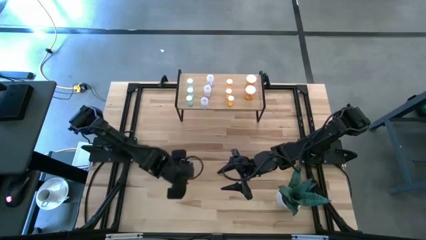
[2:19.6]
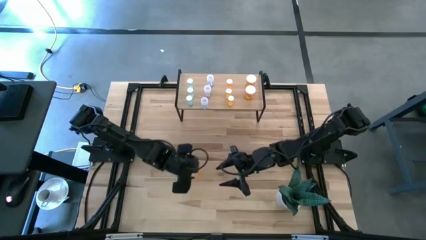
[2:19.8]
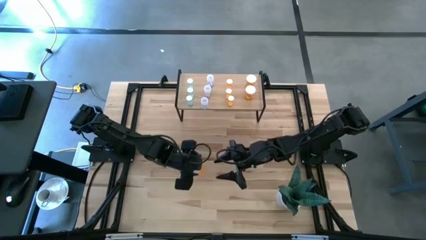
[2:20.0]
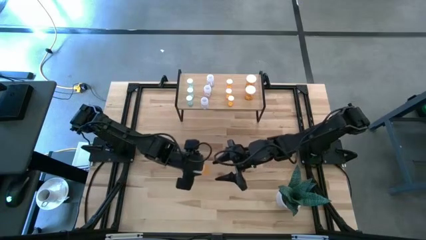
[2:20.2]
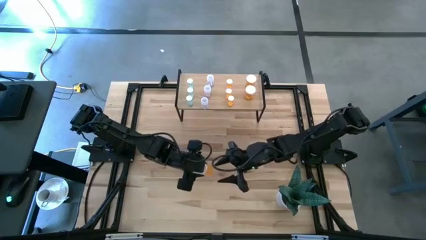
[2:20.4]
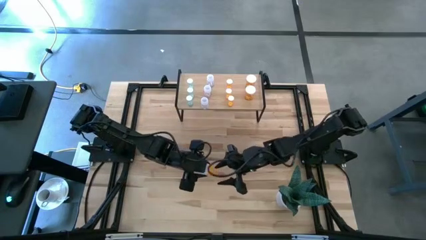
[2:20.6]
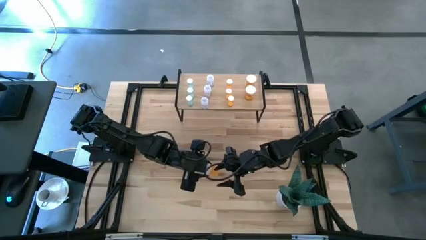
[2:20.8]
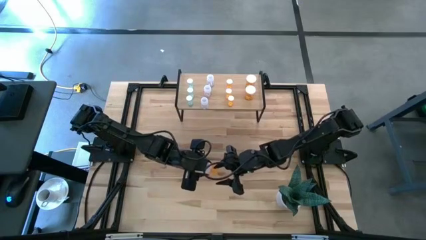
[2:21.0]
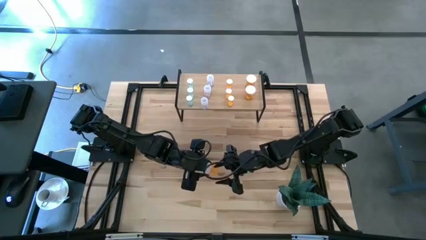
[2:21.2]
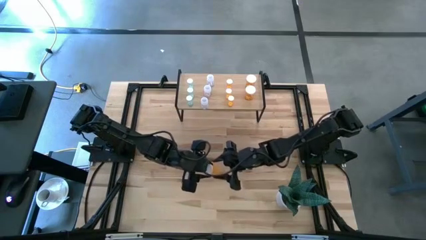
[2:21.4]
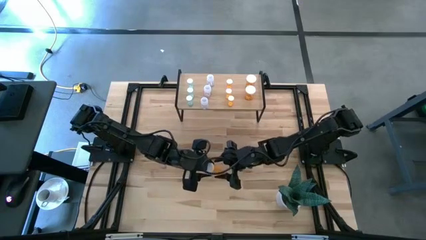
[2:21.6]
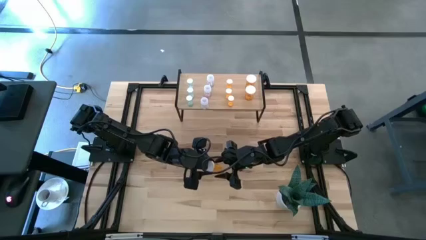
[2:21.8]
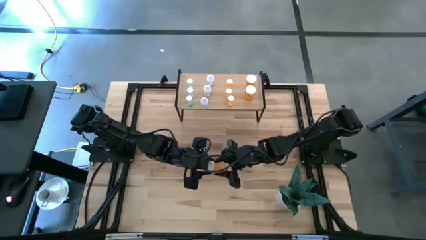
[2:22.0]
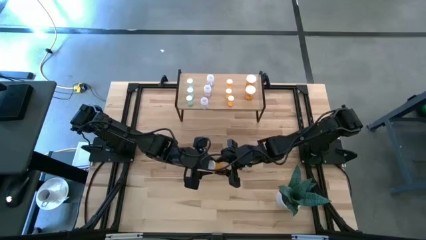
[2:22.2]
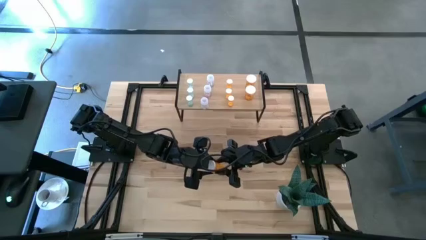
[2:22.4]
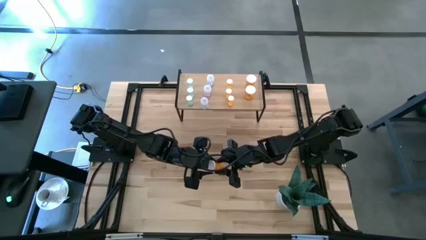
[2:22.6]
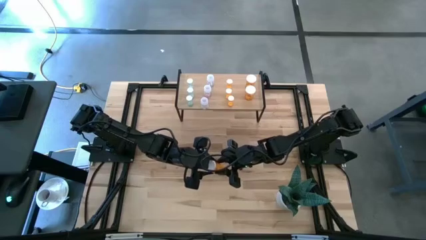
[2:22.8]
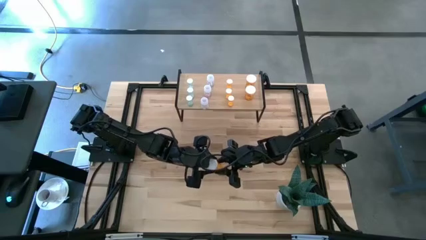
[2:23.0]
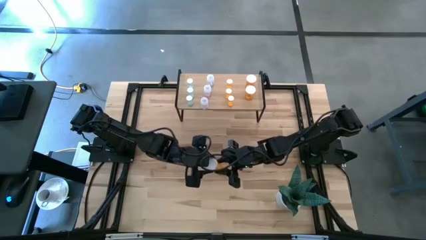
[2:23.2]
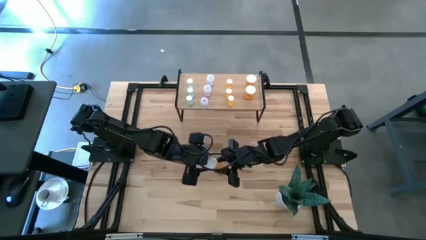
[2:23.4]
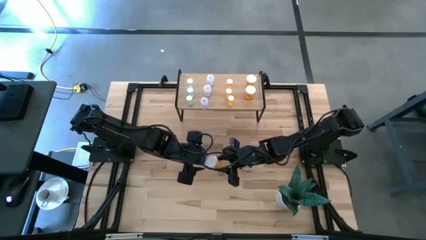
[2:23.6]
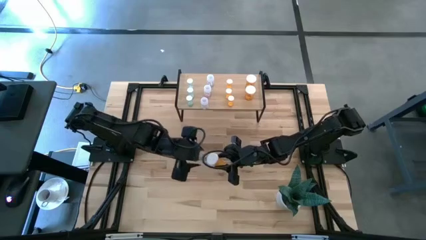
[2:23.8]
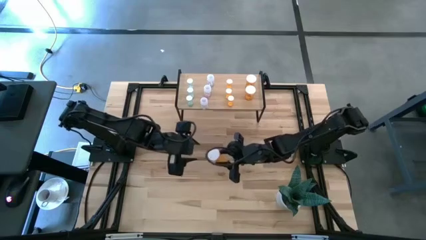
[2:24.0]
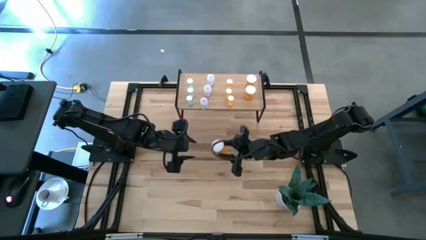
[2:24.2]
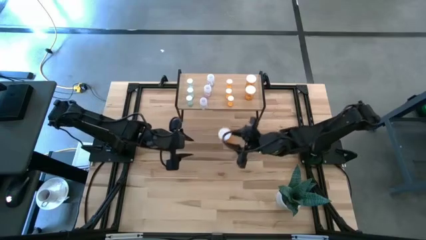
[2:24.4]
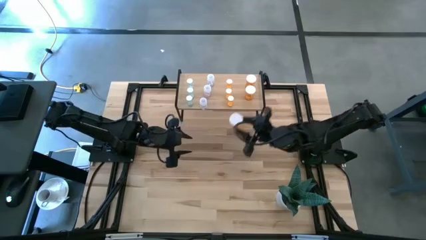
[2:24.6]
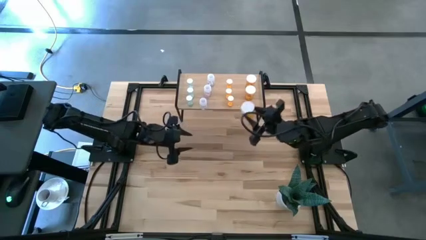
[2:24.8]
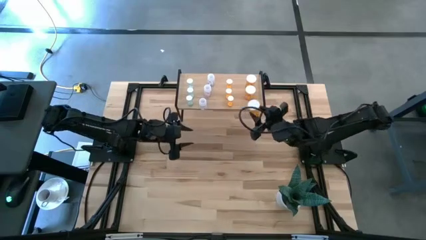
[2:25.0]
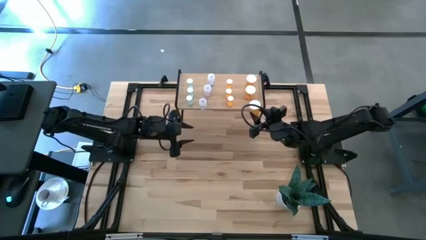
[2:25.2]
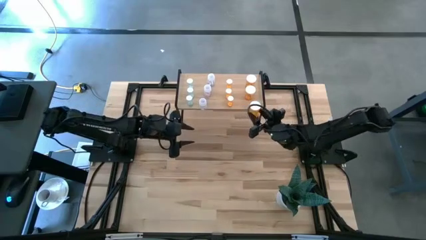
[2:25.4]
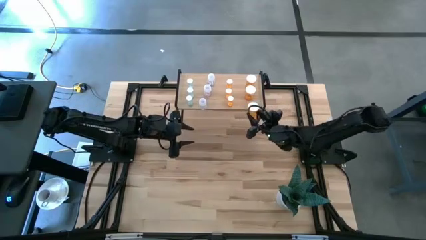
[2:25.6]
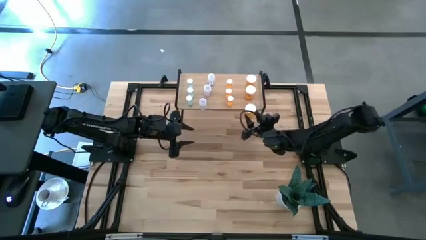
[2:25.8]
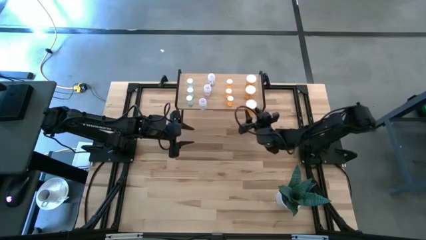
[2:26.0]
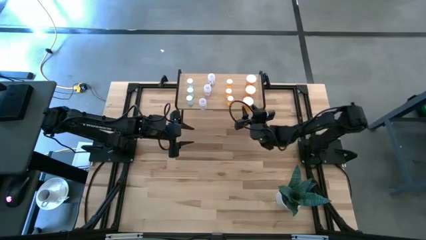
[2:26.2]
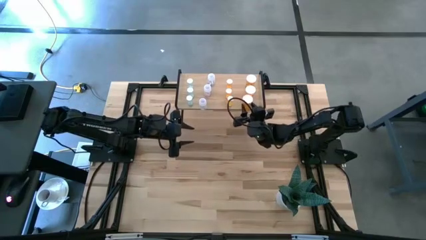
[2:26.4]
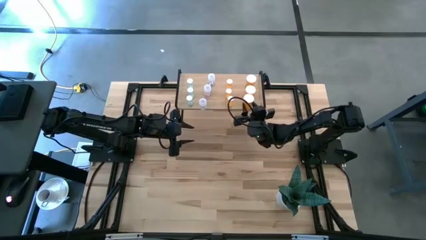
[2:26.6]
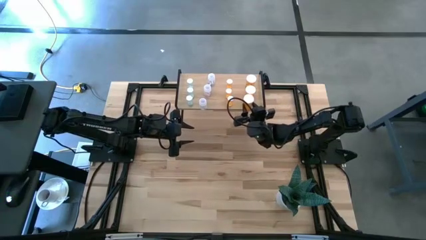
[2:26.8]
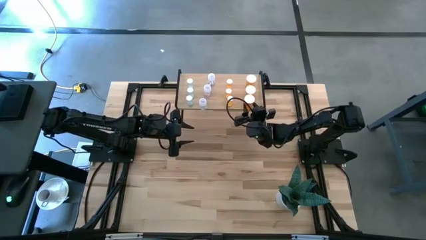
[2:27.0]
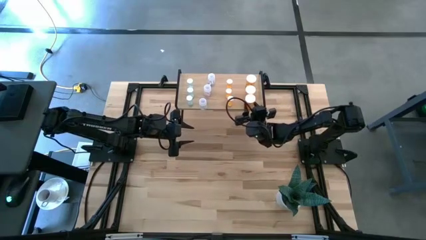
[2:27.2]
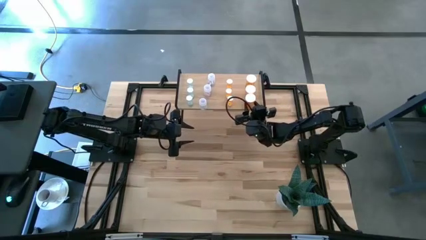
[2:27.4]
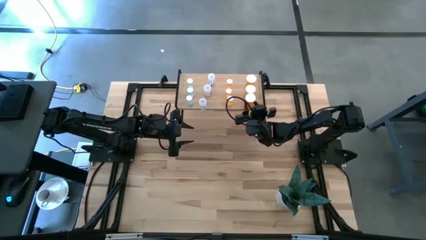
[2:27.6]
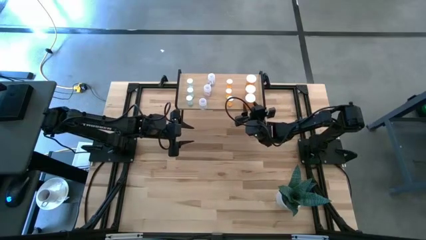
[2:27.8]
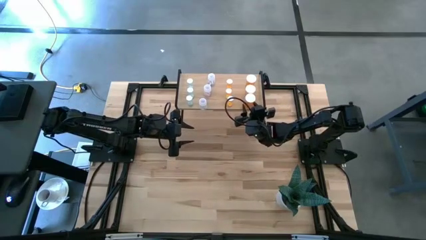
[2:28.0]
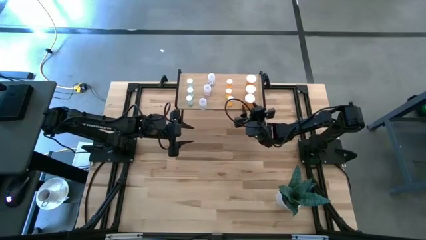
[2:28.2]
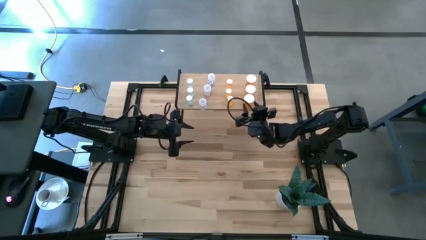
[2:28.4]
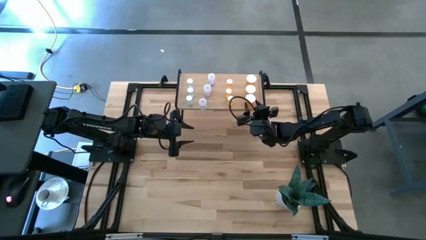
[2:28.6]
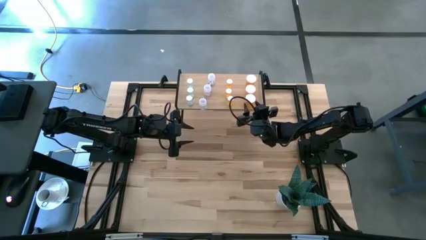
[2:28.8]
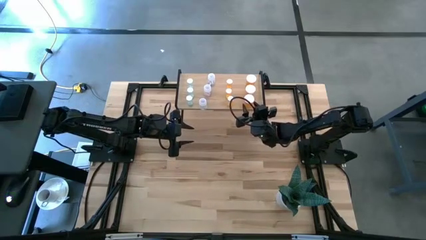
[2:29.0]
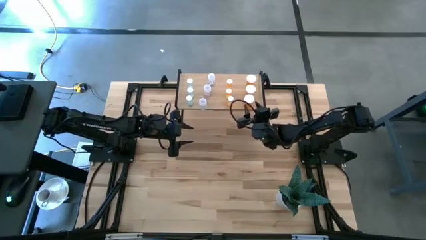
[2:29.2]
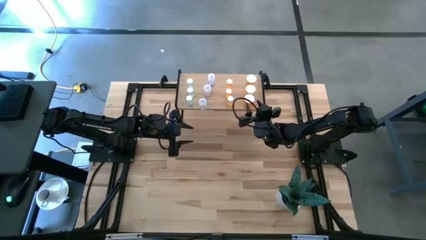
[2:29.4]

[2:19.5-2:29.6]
Task: Pick and place medicine bottles onto shelf by color
Put the large orange pill bottle on the shelf aligned with the other large orange pill bottles

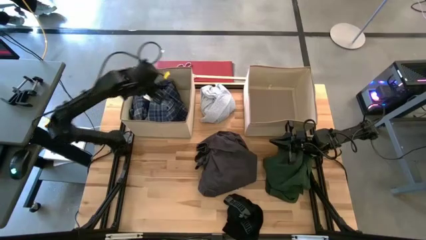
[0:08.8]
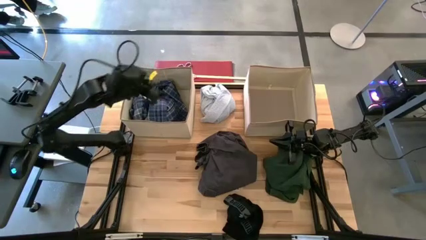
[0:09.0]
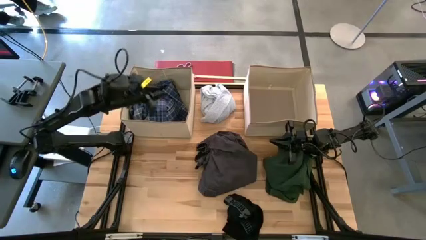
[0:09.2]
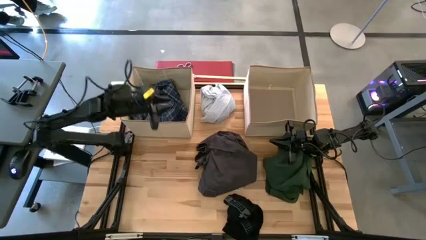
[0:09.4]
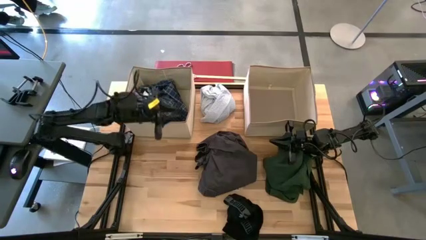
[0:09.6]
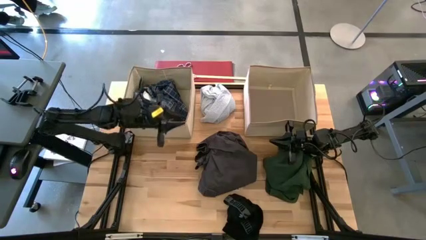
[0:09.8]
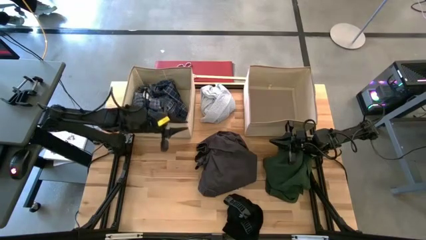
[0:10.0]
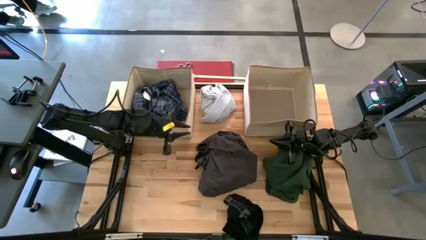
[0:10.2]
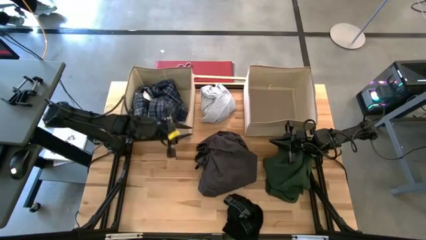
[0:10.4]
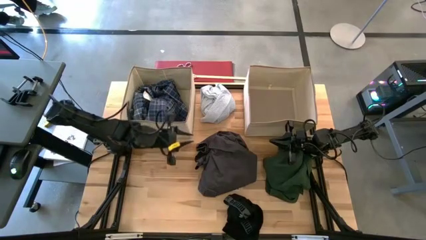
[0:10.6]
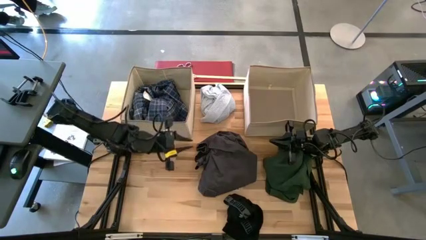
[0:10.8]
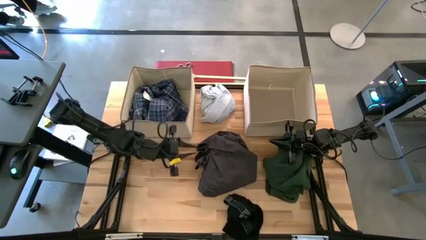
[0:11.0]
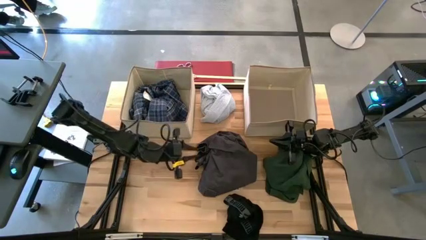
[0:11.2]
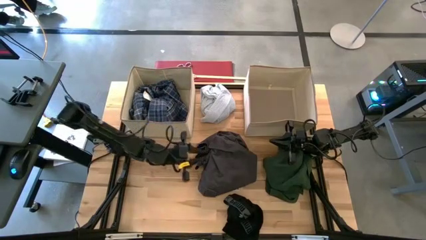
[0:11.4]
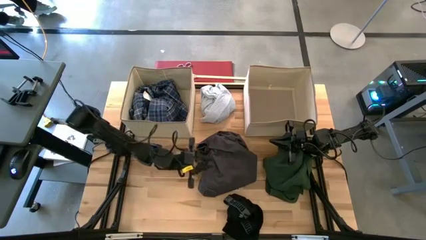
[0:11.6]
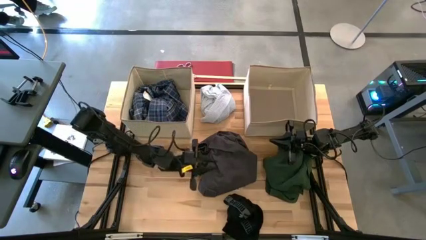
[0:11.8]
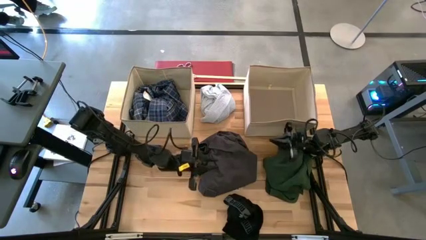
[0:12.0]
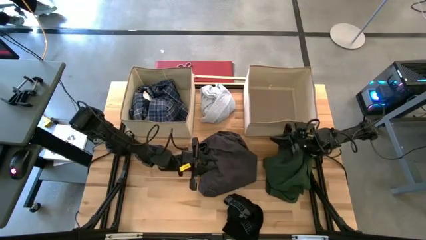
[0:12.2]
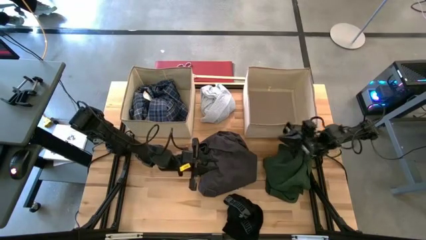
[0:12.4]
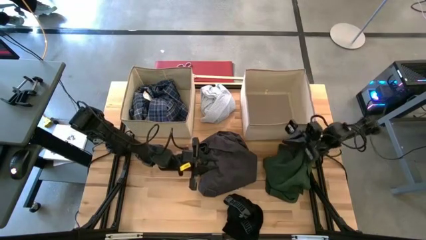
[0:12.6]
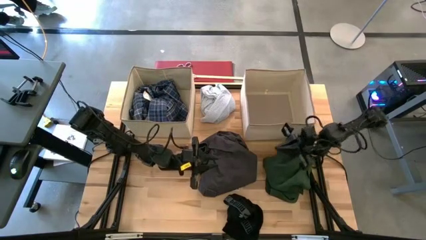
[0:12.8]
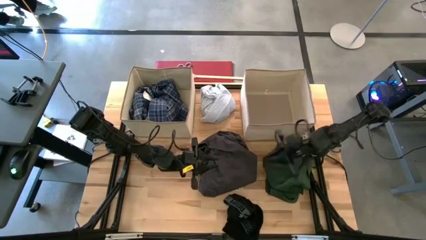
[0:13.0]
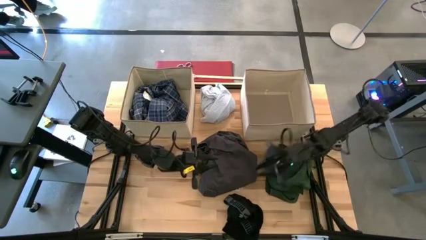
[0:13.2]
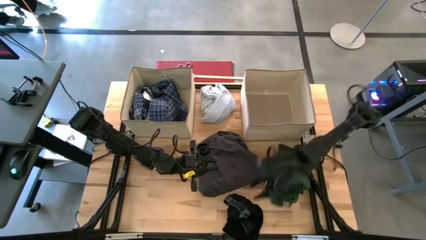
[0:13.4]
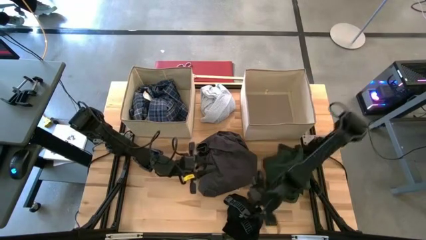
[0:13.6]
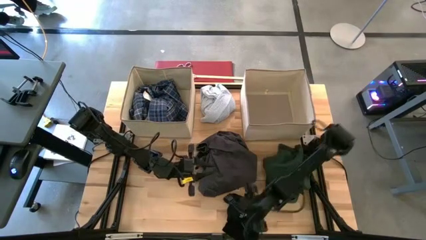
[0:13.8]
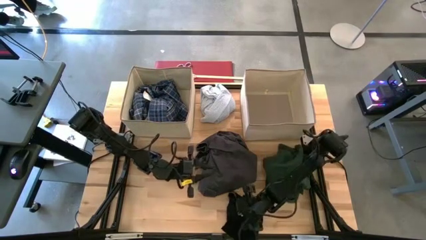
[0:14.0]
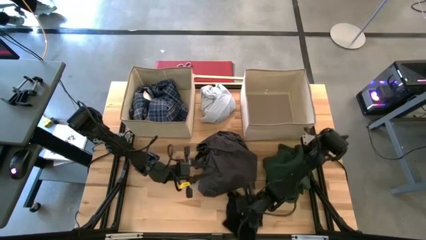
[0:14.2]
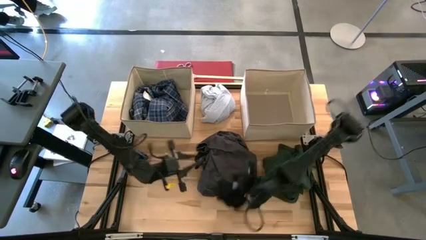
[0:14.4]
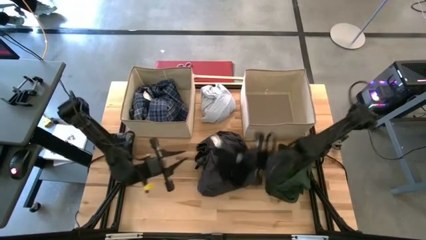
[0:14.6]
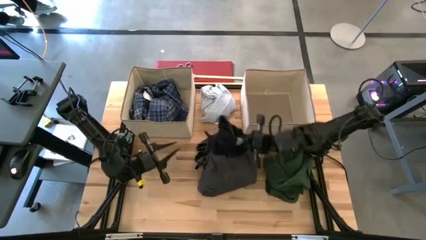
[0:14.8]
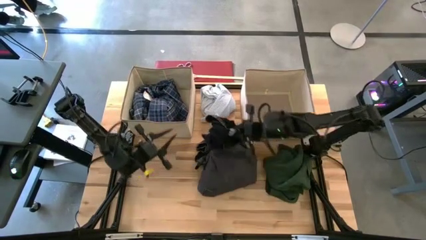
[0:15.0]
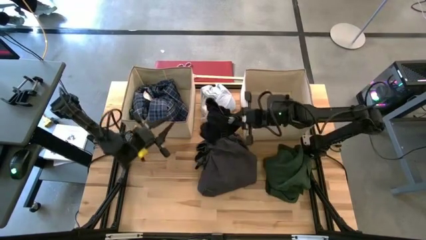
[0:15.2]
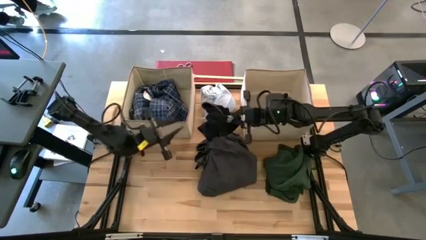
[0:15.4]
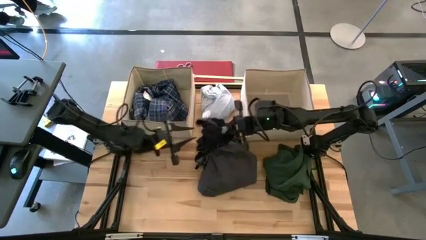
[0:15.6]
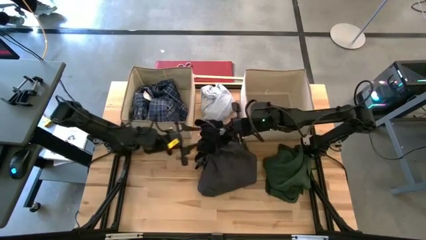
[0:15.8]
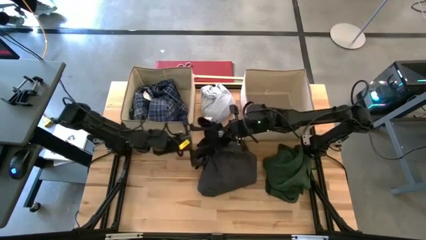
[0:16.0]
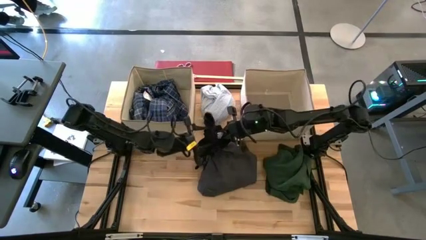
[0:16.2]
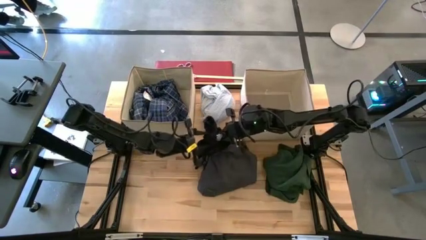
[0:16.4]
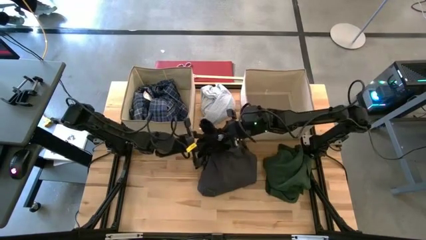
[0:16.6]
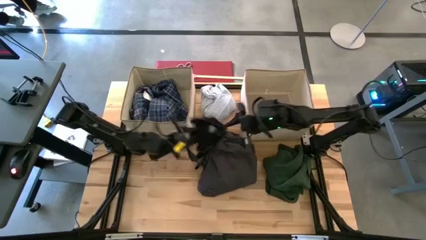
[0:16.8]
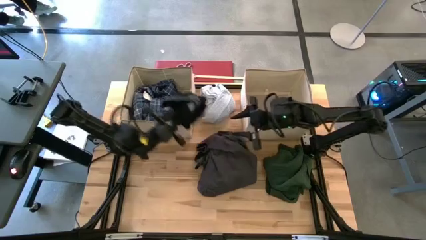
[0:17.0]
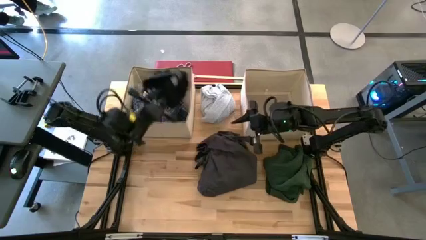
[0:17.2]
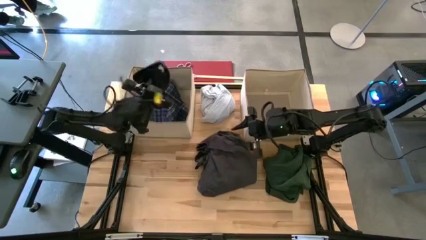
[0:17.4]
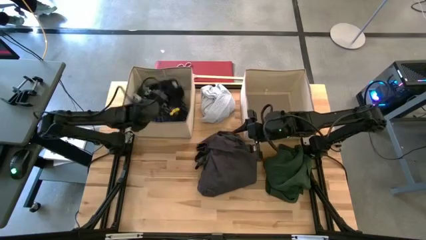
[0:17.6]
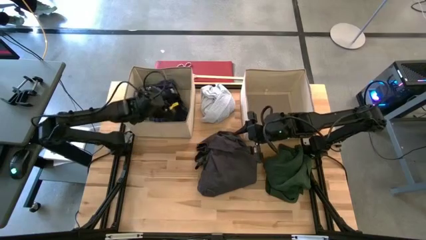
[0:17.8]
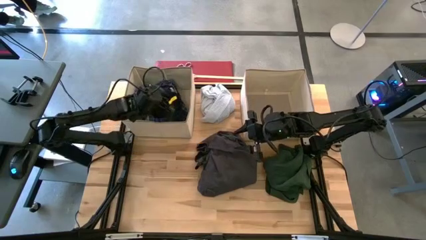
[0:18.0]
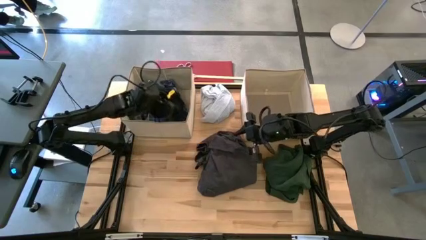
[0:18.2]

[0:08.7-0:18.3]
Task: Sort clothes
Put the black boxer into the left laundry organizer
